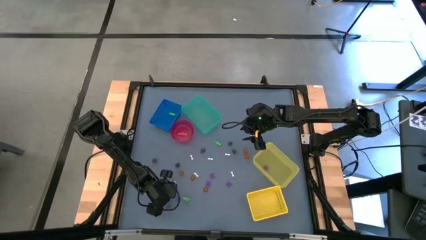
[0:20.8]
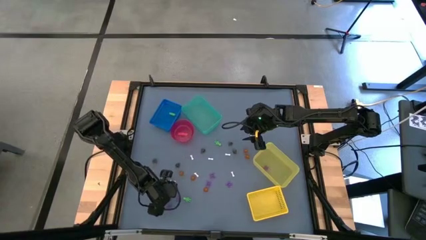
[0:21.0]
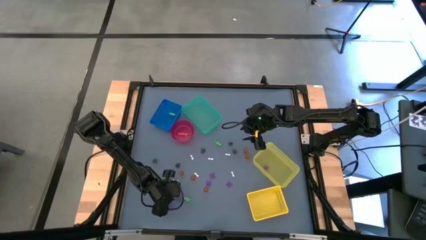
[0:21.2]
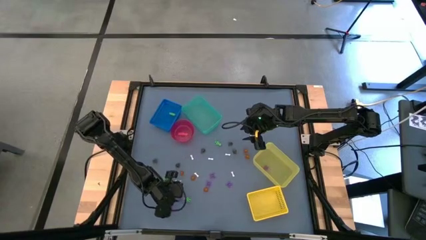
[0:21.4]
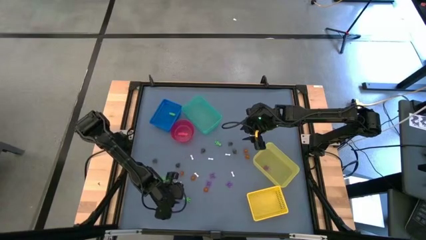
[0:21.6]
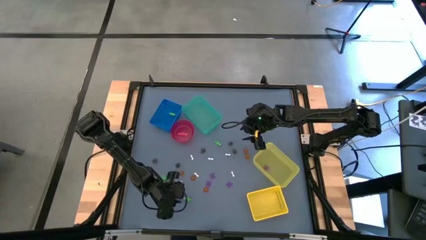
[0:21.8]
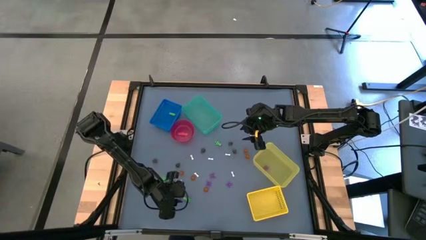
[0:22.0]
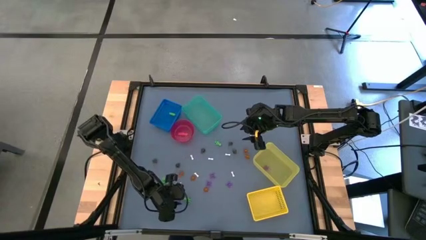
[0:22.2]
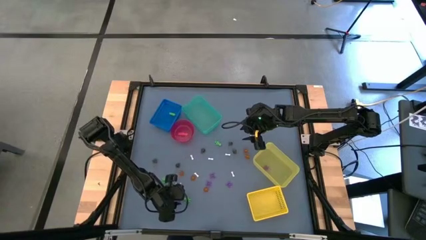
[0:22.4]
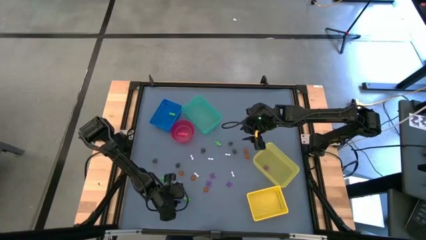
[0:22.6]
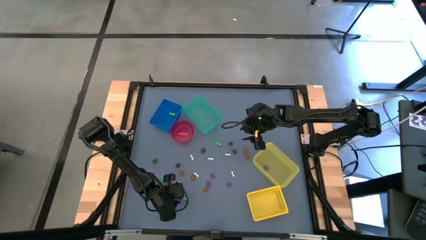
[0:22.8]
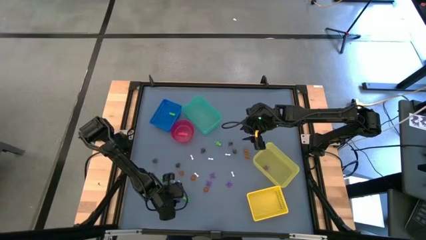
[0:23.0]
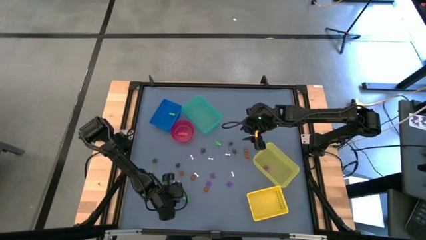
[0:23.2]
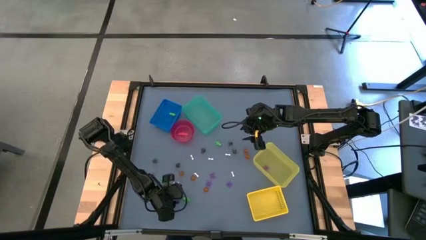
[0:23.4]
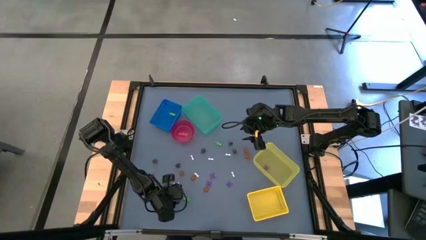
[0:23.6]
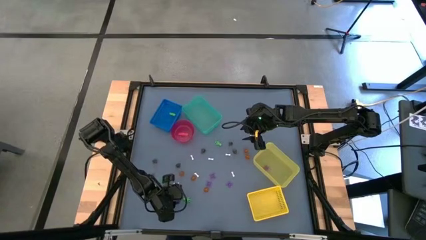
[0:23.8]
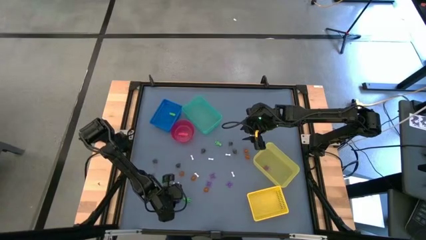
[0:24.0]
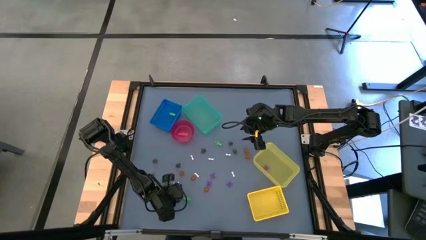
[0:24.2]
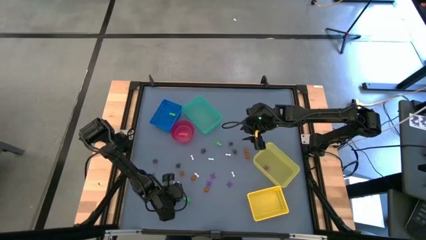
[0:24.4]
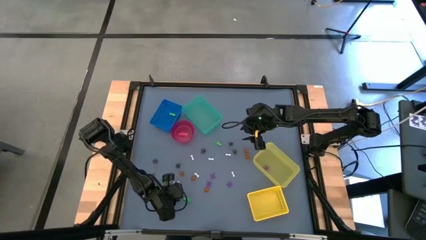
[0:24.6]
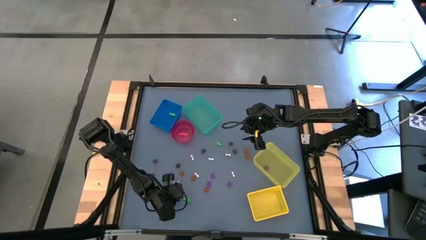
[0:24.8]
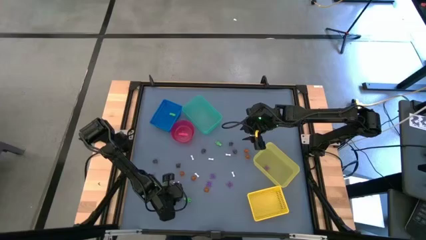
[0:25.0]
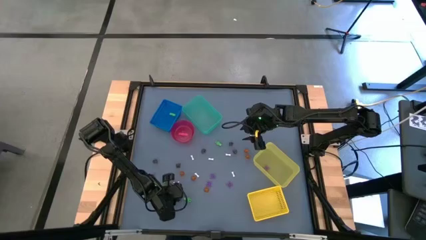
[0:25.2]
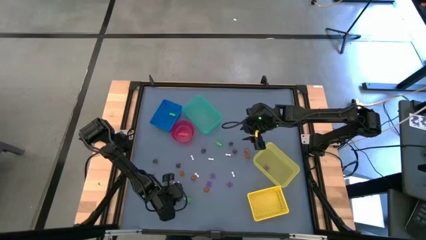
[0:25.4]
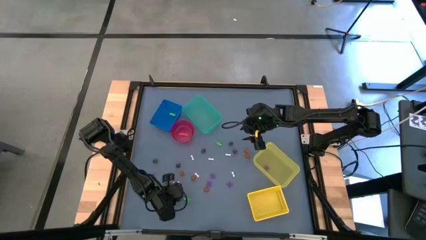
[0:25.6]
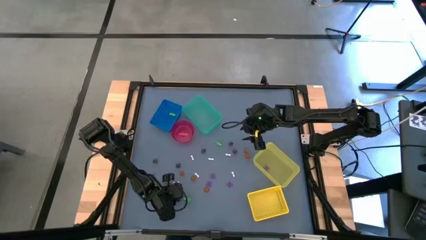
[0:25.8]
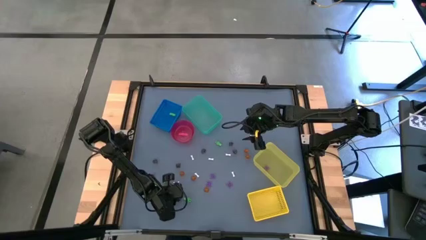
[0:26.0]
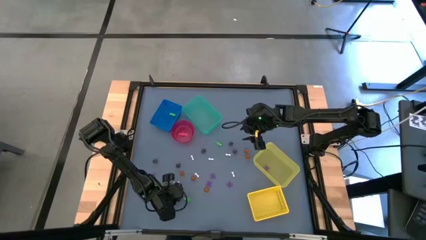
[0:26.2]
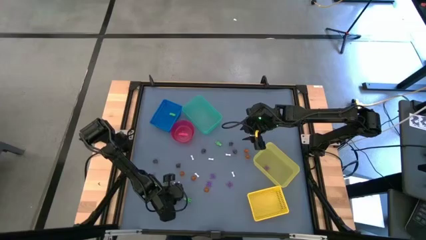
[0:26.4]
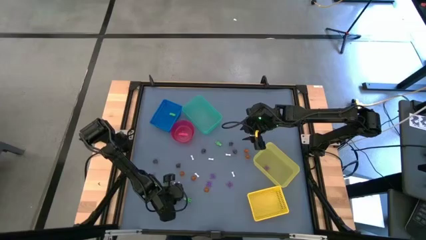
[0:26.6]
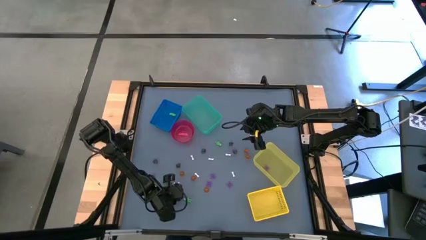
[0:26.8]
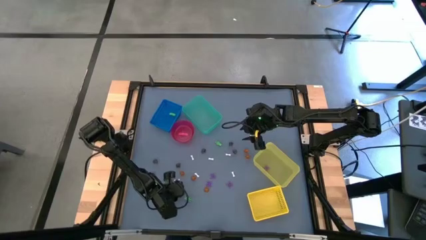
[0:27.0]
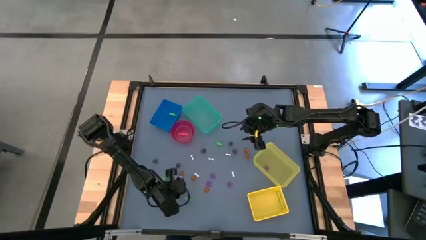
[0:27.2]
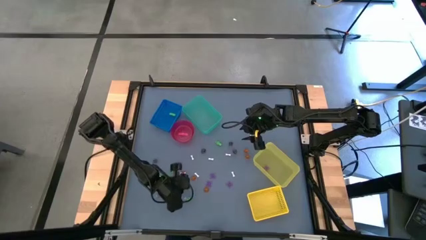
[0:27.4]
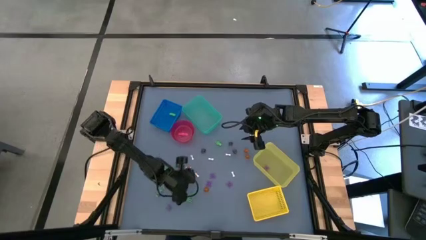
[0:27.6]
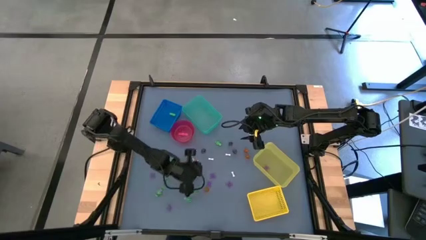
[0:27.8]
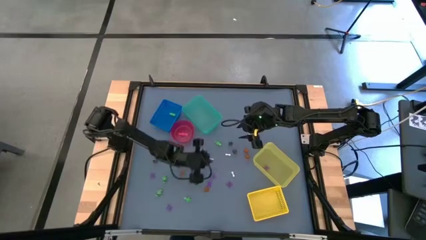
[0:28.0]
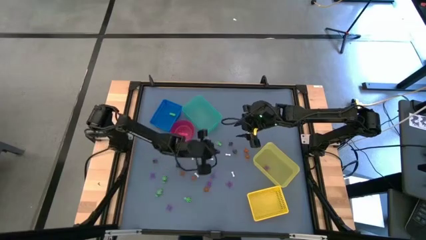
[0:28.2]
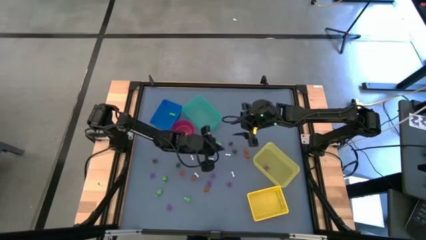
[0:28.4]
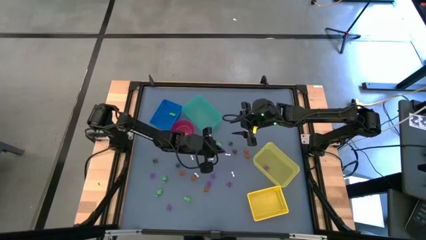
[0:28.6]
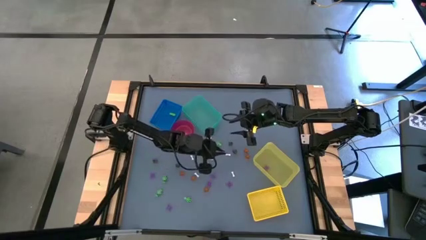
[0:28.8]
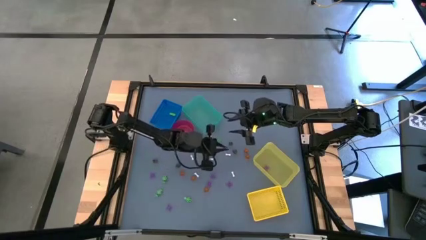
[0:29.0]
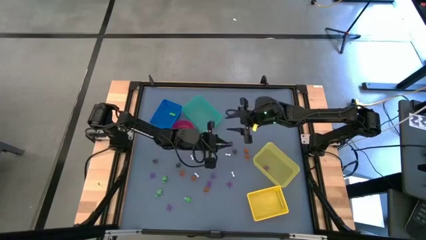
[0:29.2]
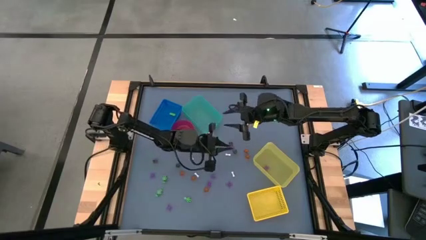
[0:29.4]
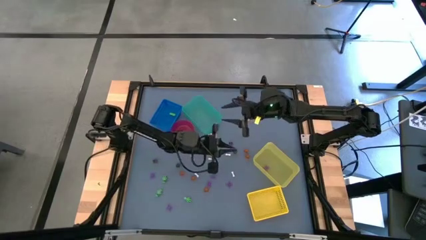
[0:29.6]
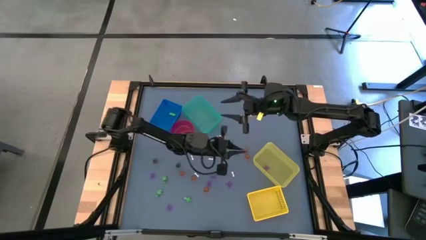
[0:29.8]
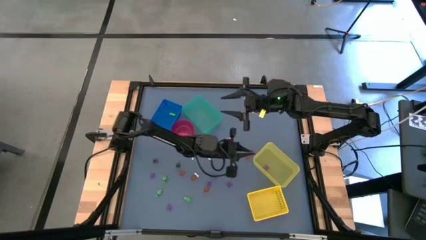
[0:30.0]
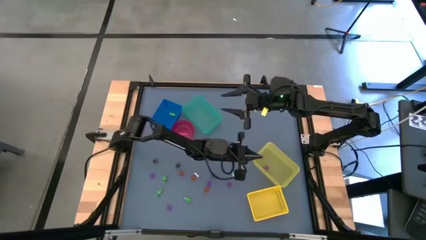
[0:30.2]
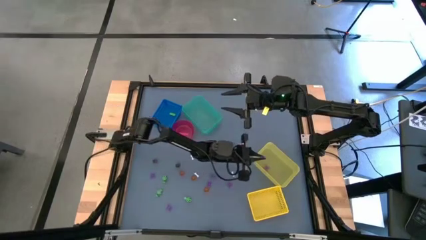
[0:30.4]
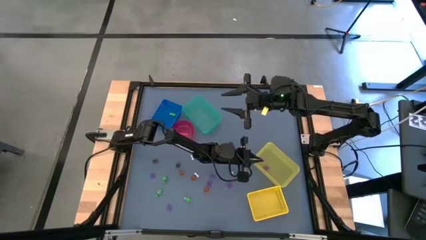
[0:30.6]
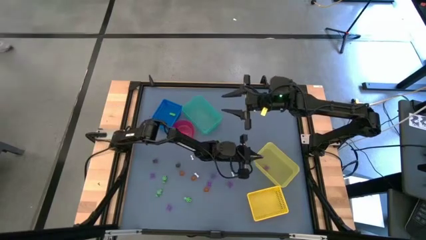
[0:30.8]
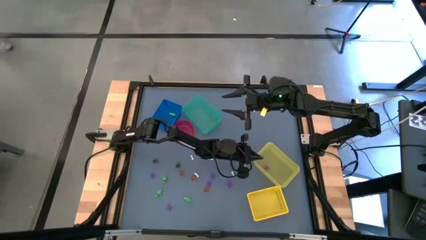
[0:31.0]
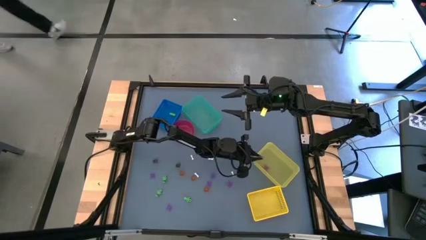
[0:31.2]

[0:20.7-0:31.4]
Task: Sort Halloween decoration
Put the purple spider toy into the yellow bin
